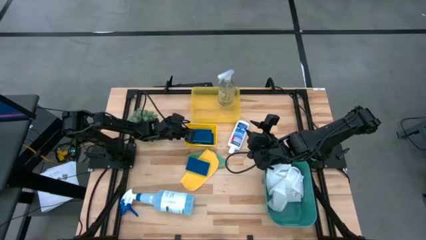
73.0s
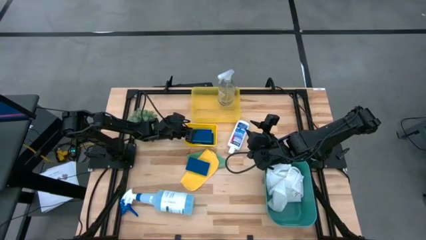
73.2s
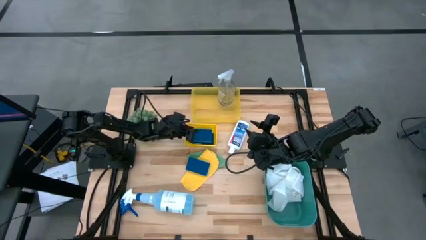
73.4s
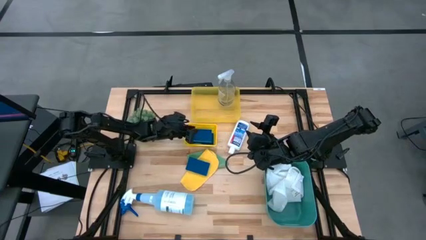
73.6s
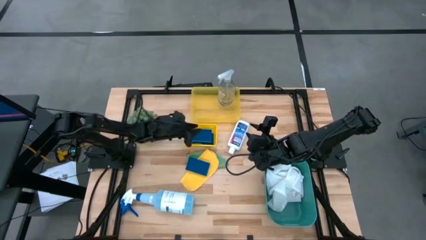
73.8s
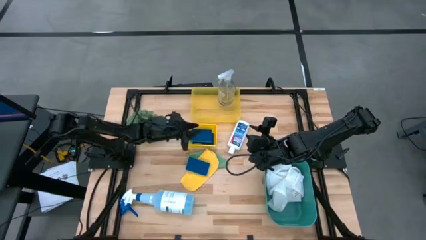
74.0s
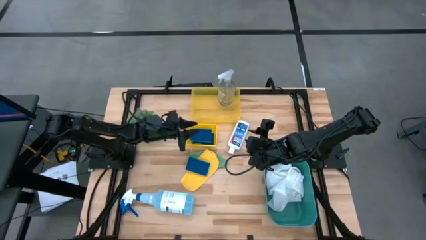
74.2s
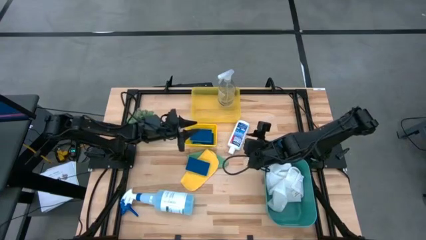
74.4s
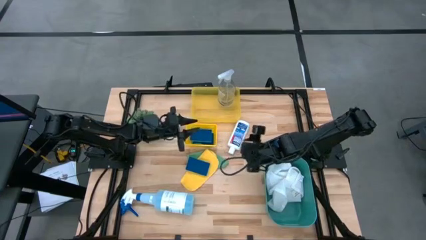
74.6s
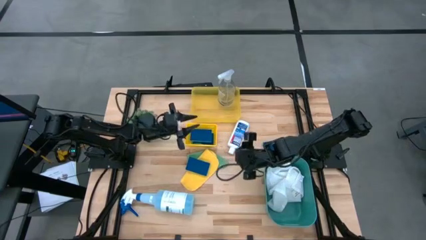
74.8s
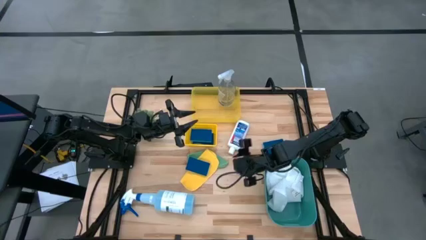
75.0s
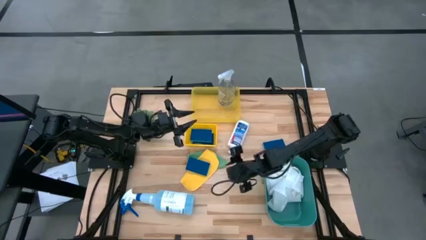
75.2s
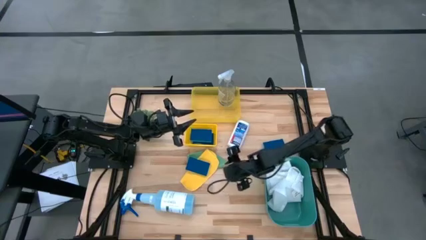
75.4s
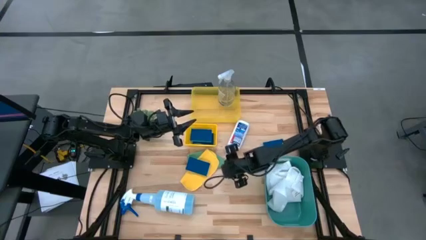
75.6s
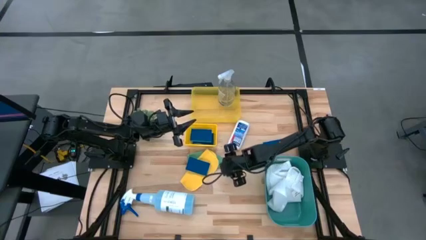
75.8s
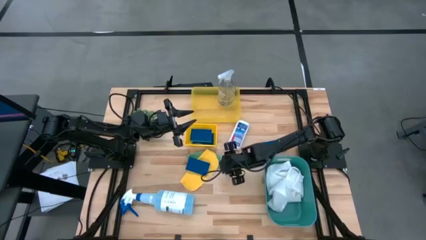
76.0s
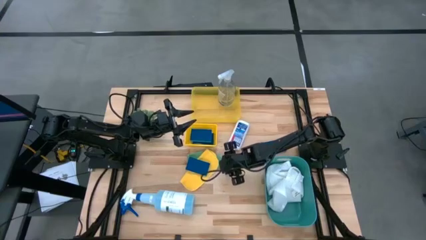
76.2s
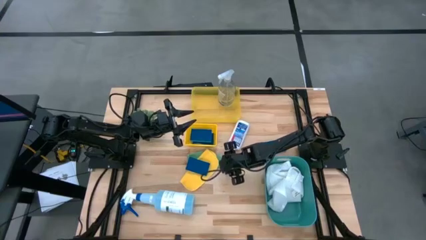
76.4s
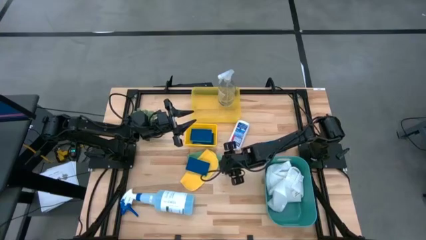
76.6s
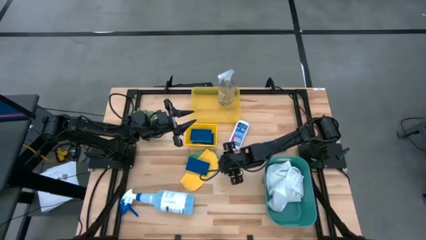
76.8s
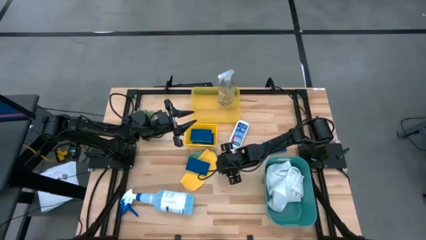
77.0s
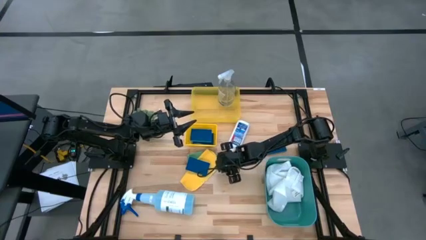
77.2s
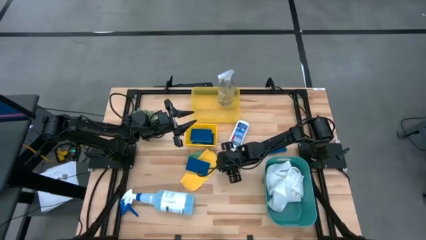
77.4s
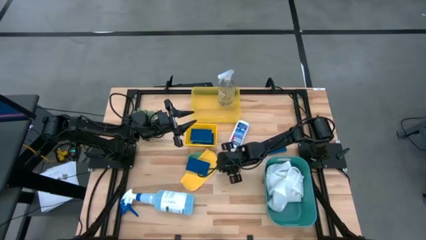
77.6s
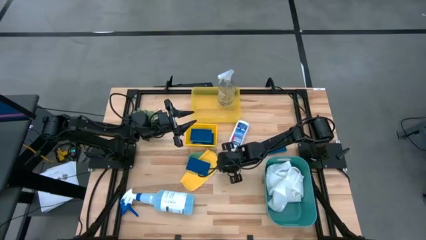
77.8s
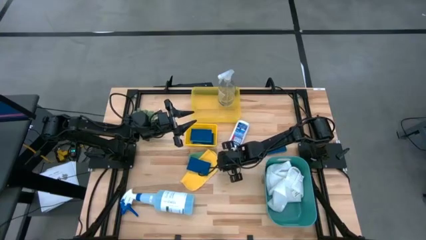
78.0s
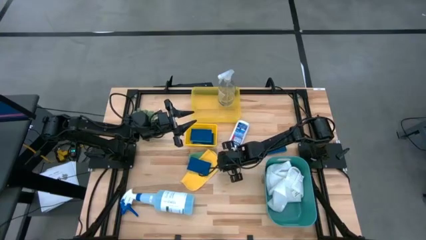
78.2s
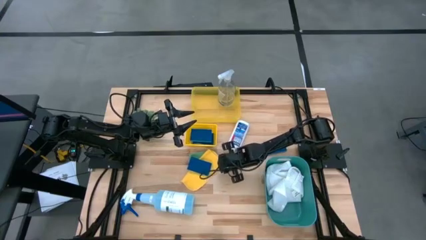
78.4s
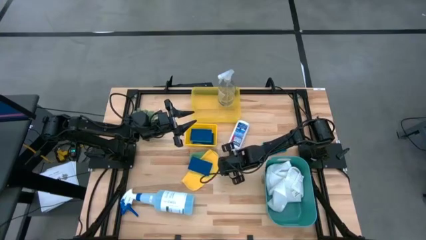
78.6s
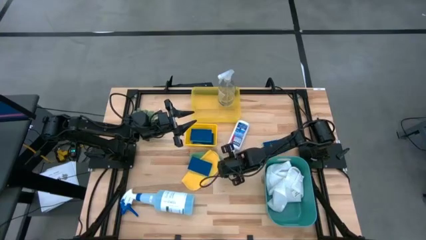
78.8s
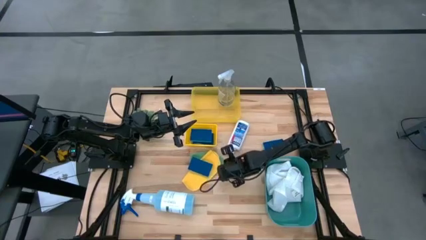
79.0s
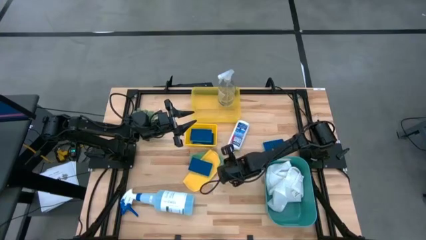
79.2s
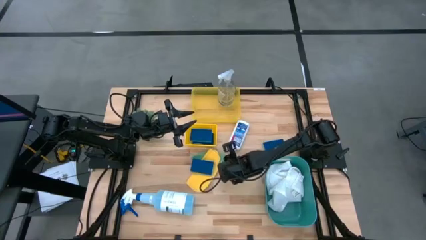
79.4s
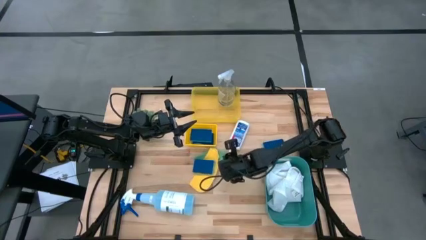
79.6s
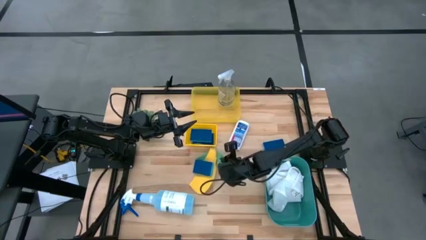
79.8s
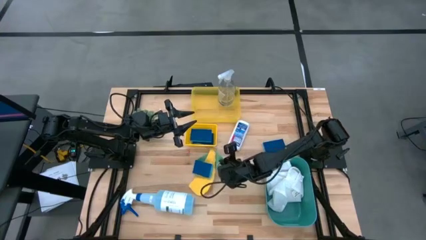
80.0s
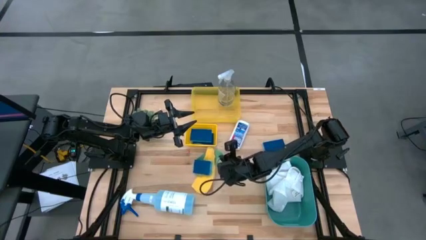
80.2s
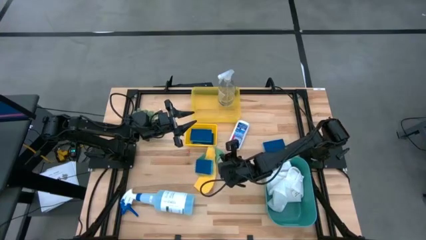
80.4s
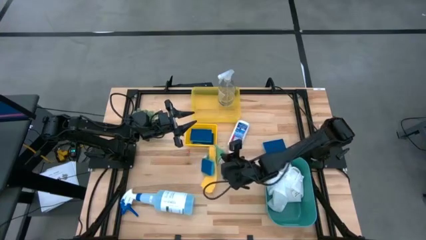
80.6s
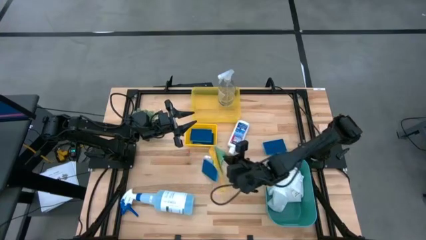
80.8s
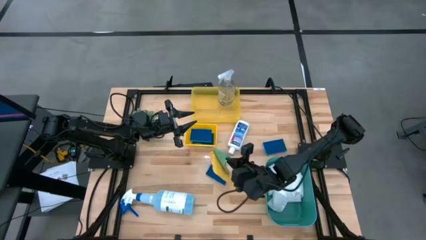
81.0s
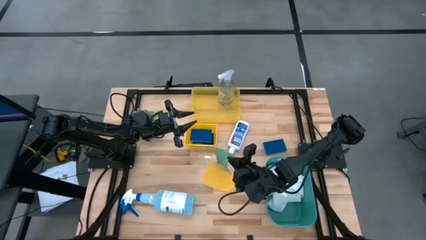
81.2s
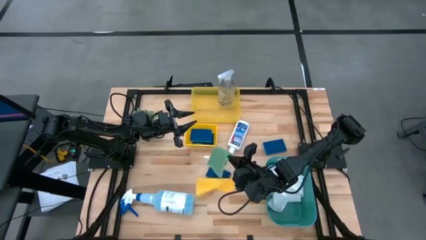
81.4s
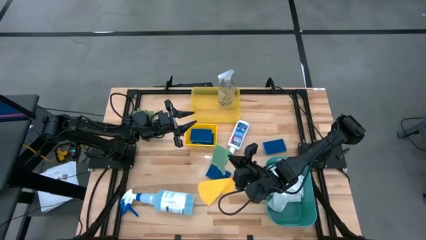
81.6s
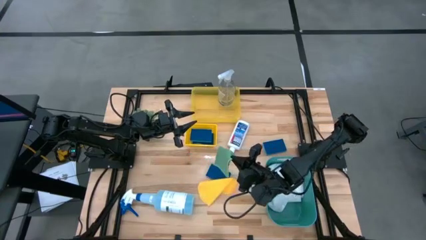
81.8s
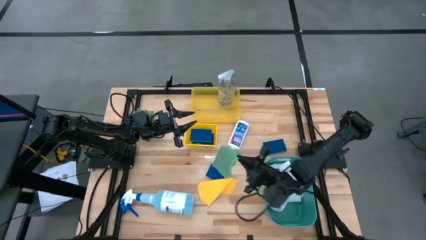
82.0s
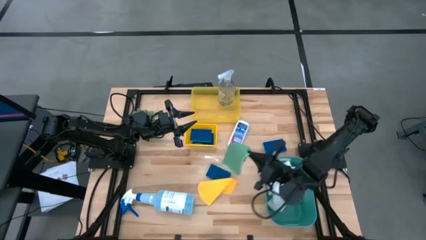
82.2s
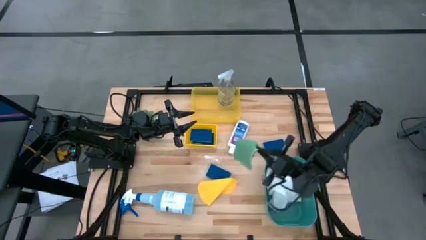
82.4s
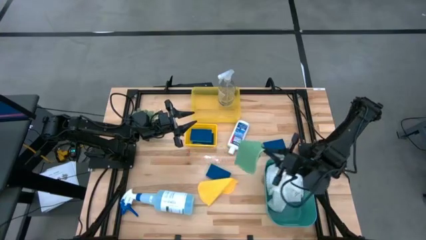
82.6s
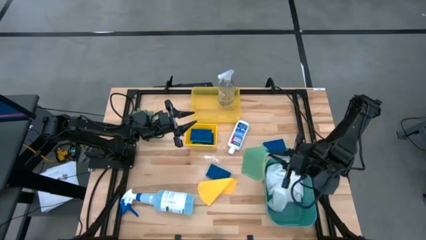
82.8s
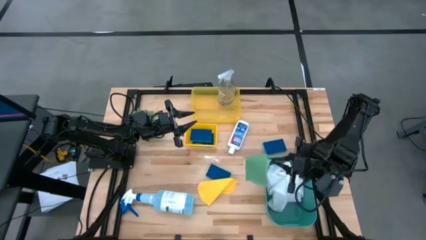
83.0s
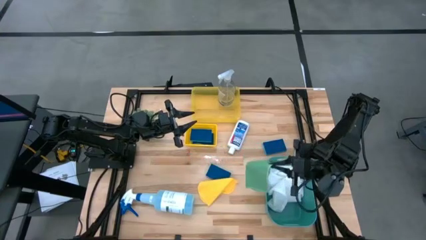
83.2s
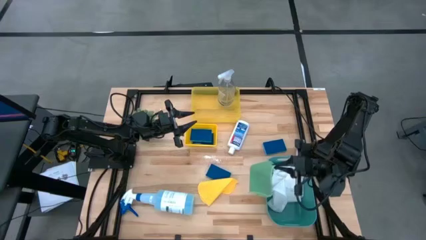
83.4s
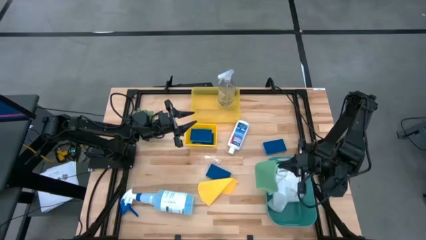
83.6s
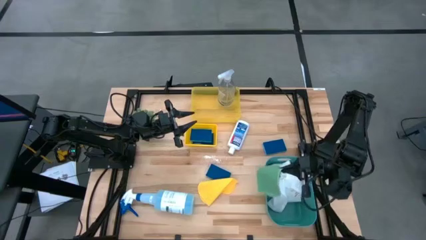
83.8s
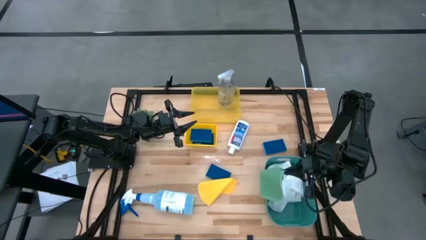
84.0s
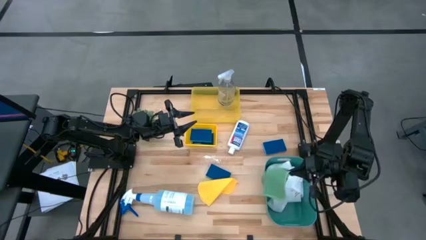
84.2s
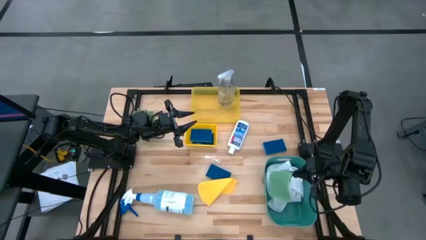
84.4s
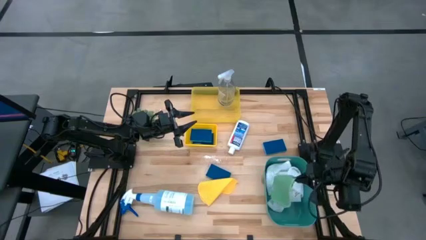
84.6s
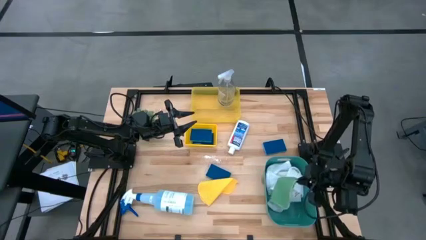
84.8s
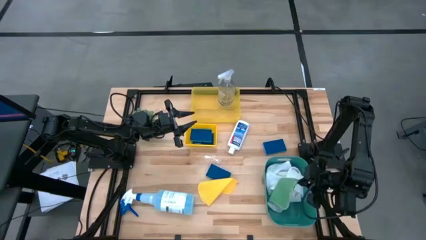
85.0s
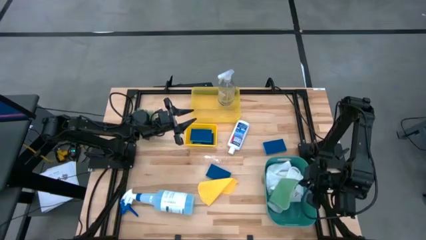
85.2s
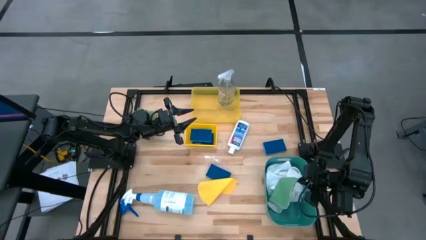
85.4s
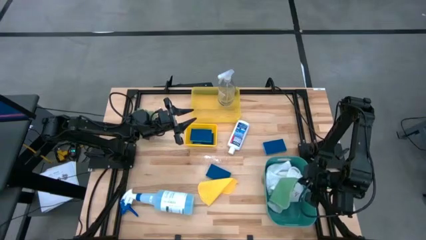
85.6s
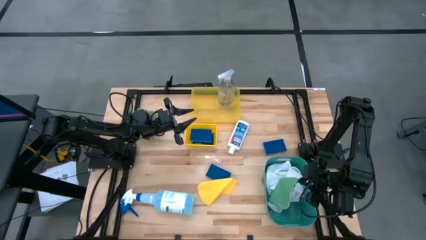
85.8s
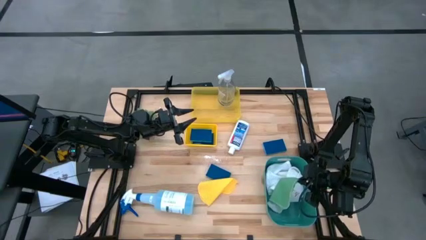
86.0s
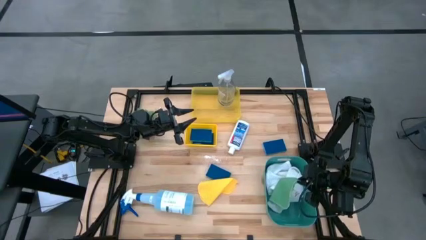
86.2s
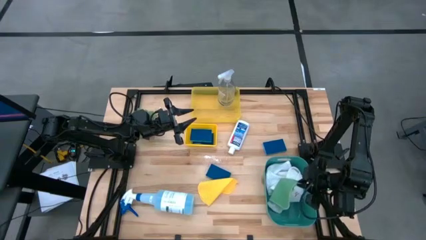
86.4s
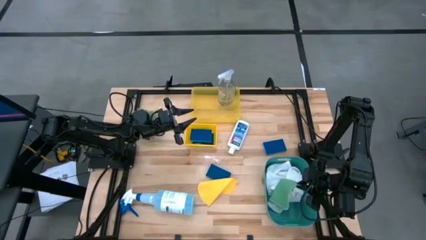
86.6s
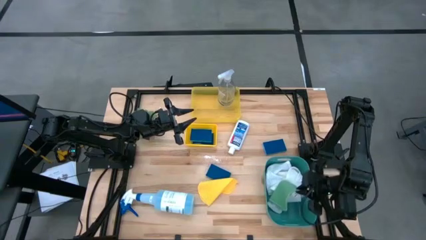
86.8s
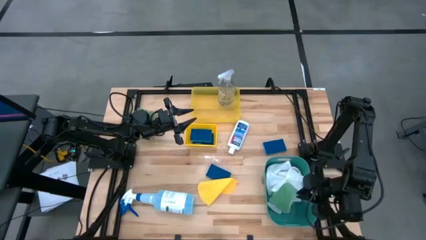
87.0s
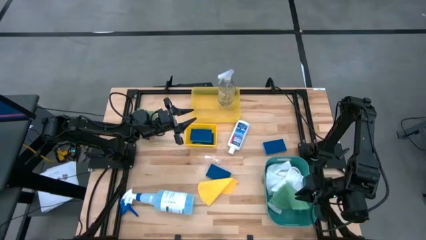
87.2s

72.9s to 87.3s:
Task: Pick & Place Kitchen Items
Put the green cloth into the green bin
